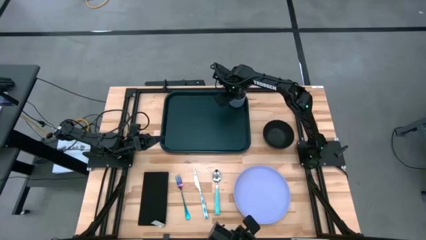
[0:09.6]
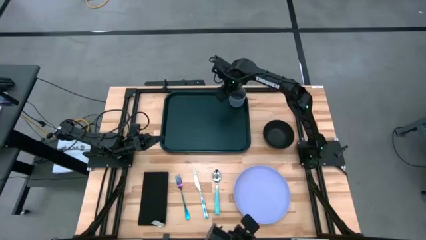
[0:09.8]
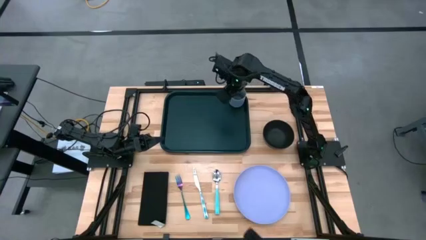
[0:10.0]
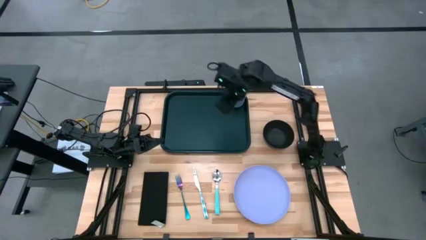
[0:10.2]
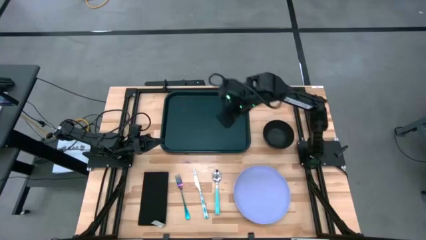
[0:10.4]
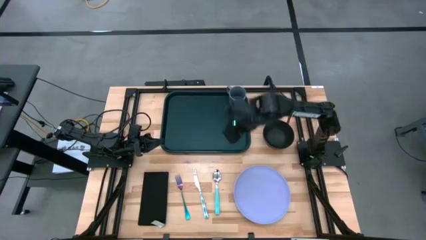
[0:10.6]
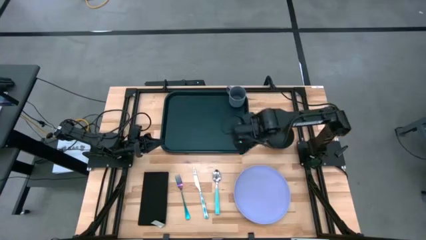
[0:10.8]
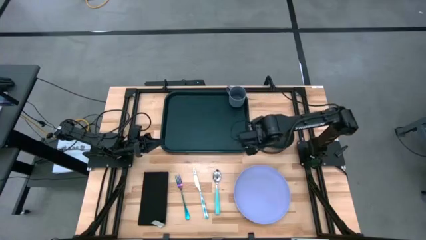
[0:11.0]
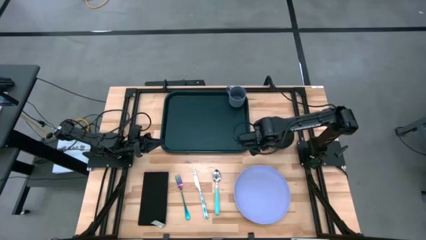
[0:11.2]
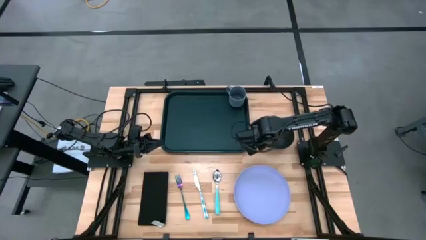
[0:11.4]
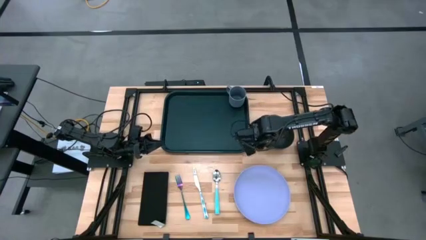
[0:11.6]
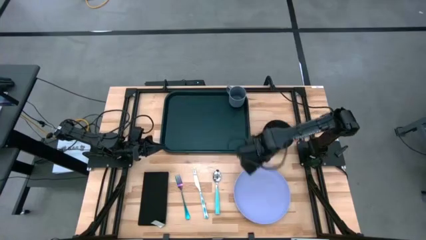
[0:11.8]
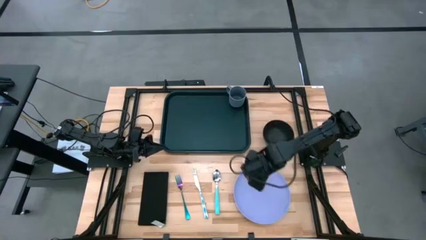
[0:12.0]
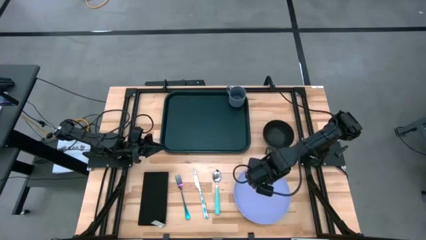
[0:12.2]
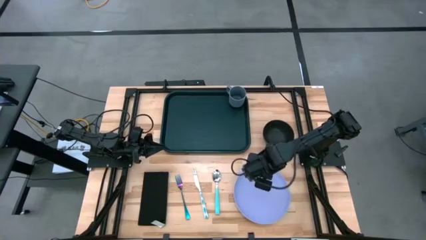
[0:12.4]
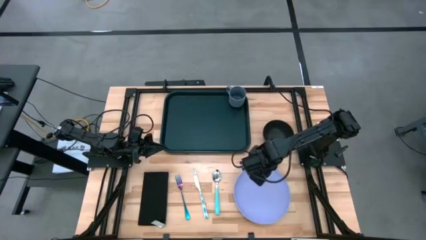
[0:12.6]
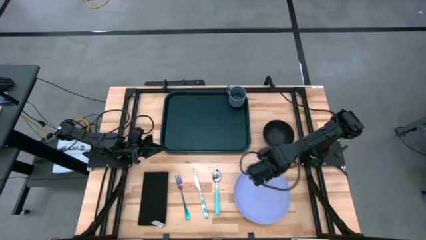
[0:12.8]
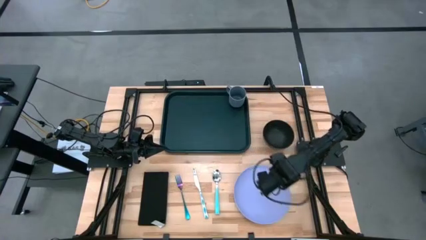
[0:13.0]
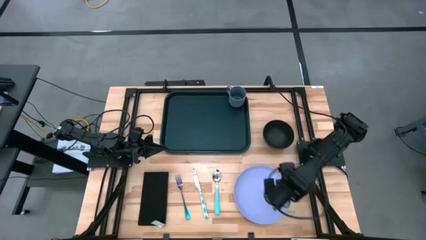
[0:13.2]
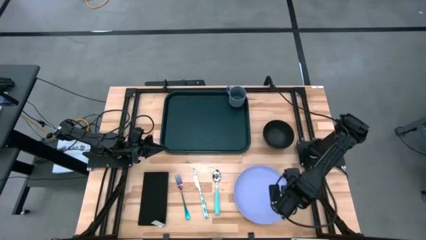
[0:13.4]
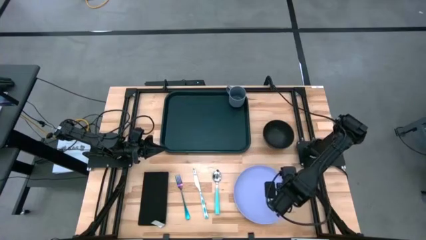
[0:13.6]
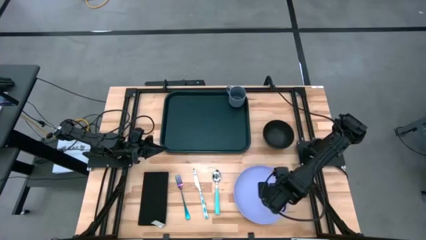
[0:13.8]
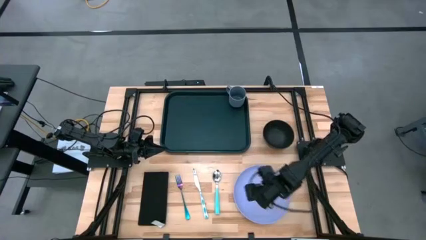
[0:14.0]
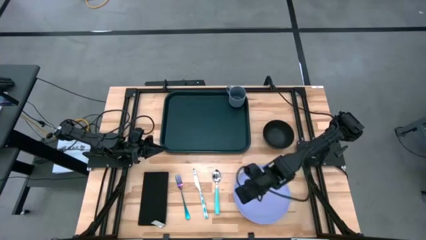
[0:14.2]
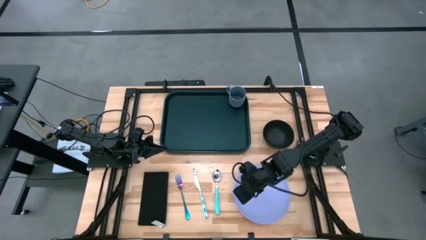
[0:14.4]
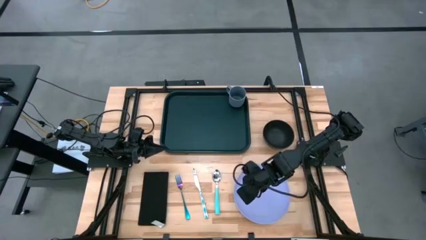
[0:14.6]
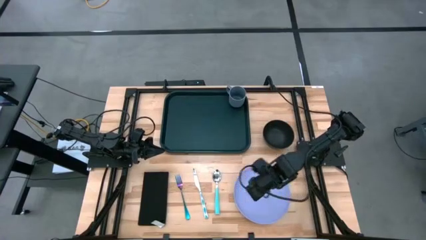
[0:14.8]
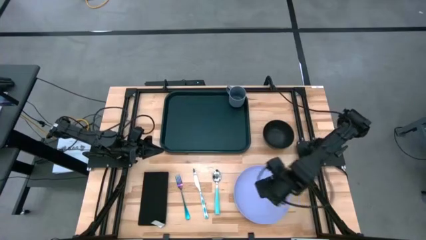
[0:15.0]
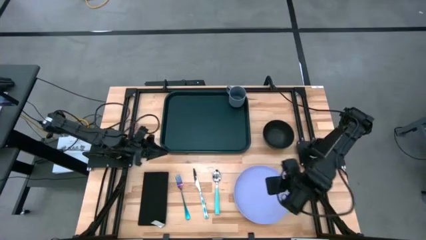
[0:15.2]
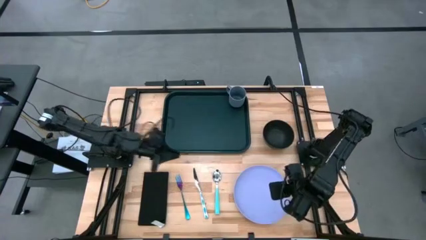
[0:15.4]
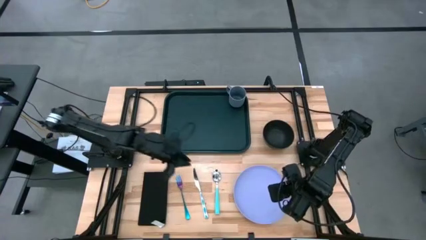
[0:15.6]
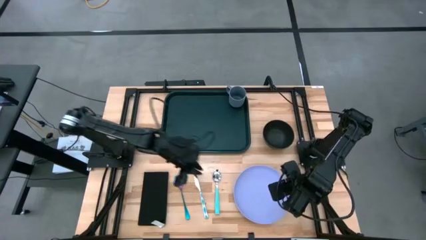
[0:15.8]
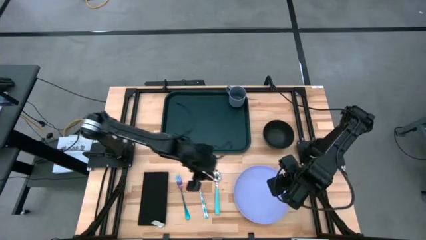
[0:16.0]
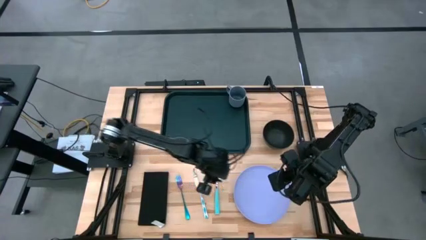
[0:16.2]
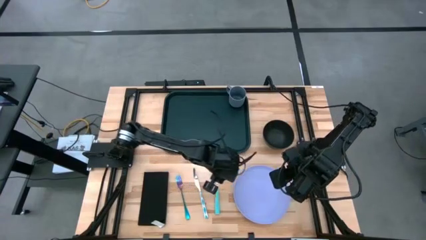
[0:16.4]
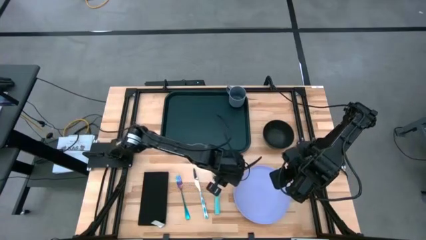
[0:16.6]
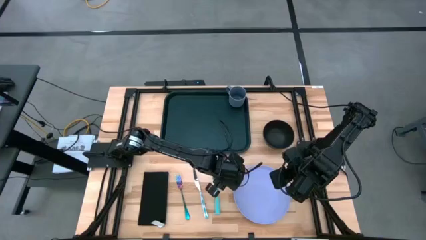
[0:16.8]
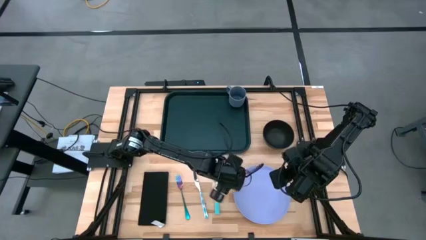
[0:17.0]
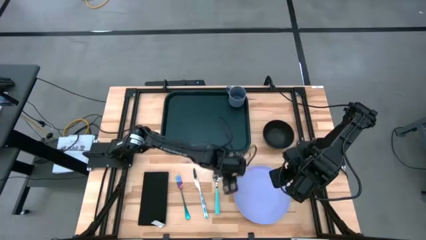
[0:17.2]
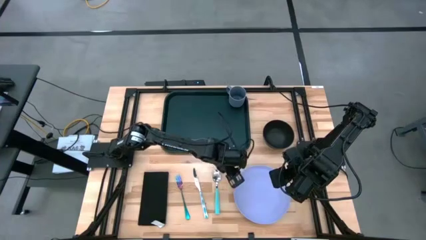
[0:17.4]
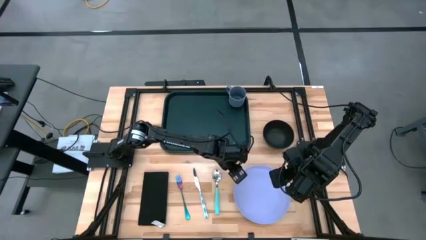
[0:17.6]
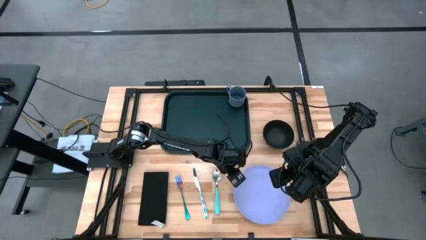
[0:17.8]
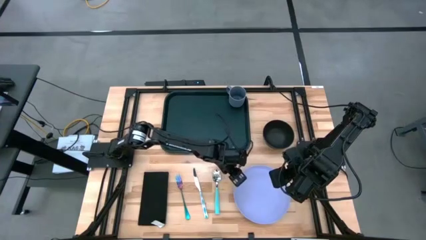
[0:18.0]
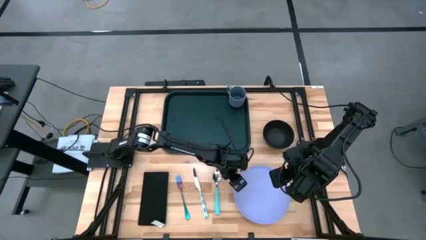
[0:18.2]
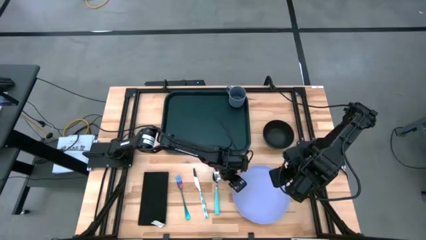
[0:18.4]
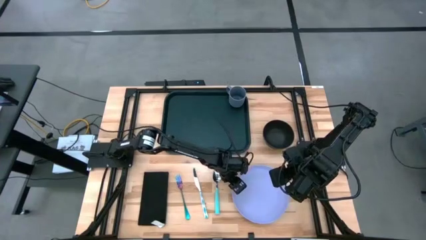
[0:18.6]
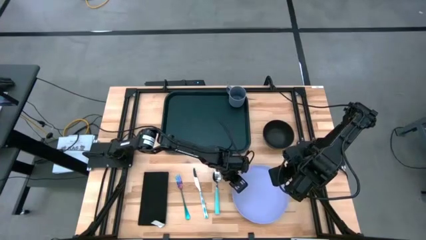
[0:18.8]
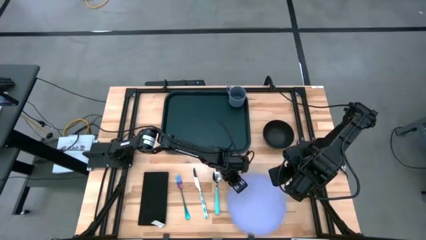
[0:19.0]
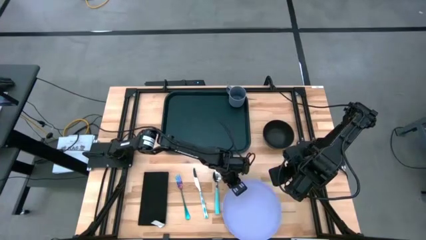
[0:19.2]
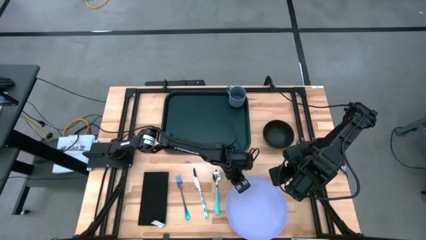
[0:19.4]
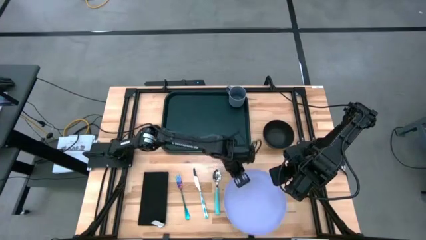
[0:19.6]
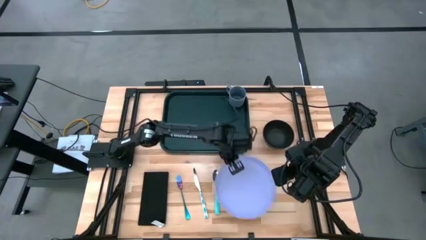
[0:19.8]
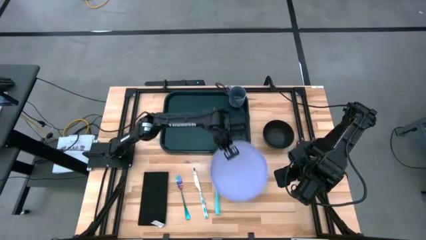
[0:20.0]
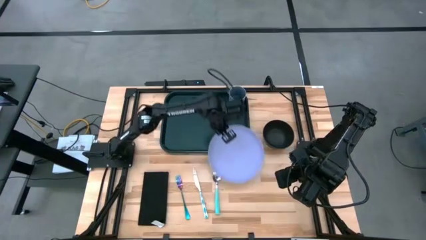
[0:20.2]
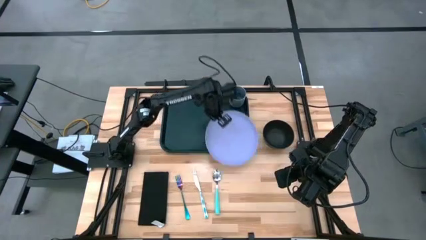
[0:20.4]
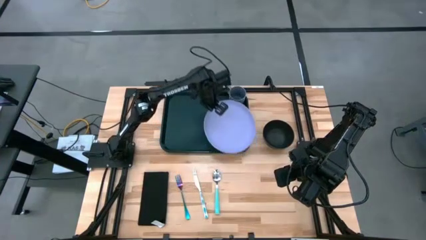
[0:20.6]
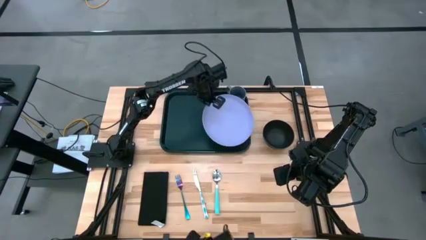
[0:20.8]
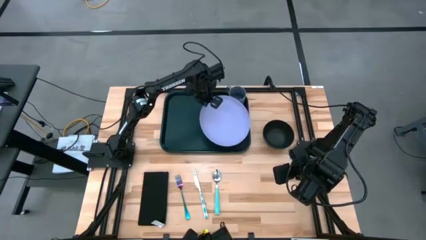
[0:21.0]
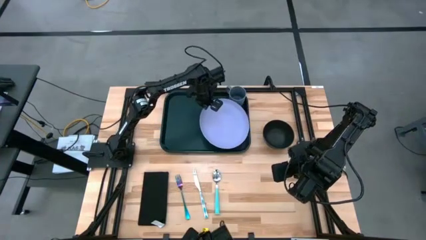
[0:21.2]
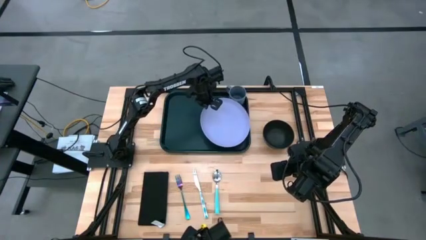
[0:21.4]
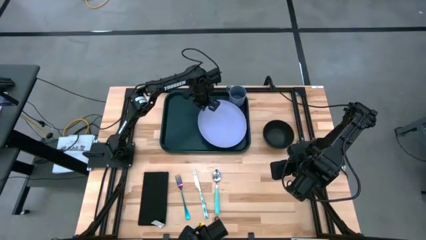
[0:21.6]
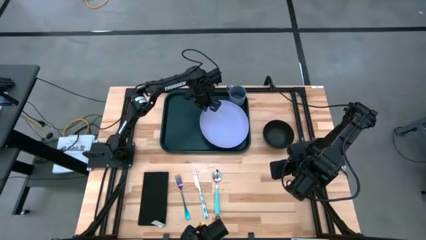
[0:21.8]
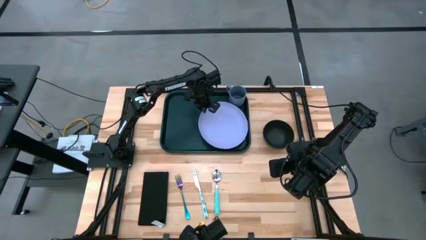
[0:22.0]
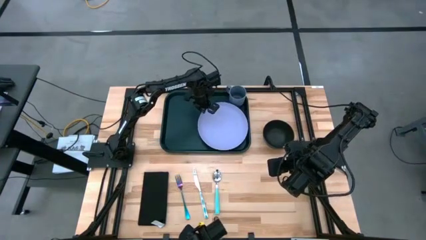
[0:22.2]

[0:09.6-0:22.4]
Task: Set up tray
Put the purple plate to the right on the black tray

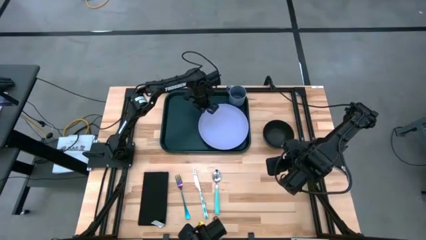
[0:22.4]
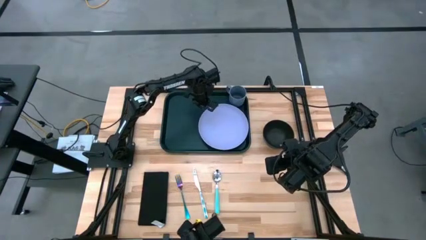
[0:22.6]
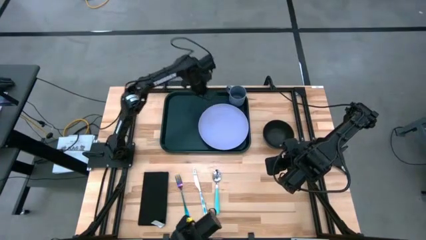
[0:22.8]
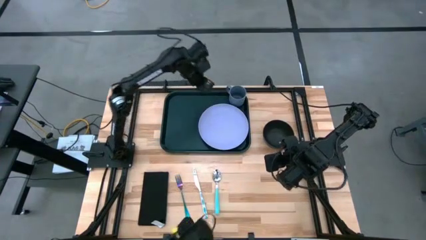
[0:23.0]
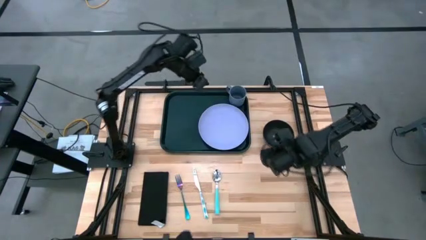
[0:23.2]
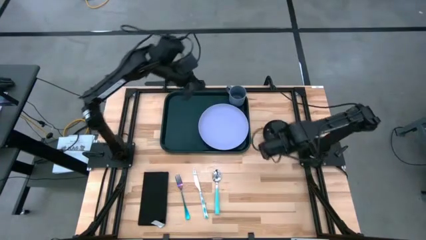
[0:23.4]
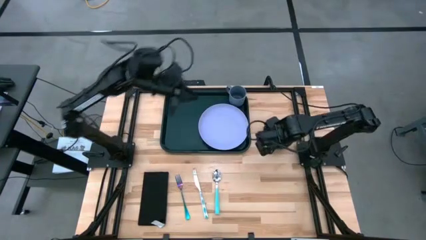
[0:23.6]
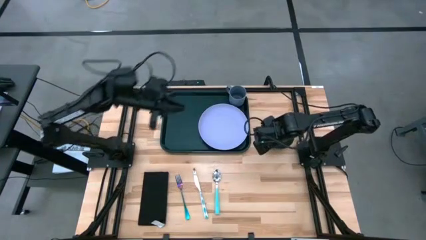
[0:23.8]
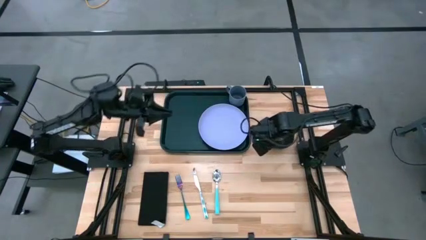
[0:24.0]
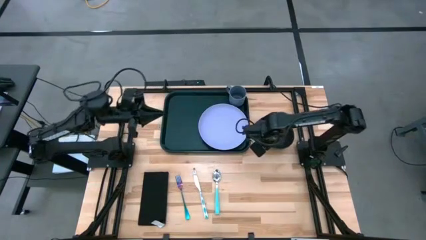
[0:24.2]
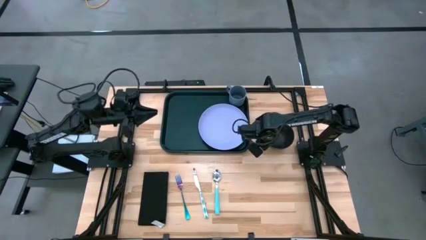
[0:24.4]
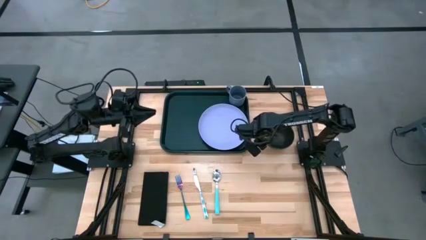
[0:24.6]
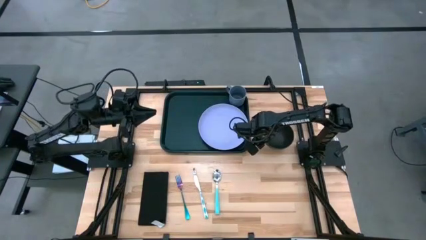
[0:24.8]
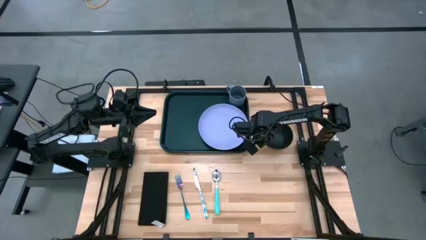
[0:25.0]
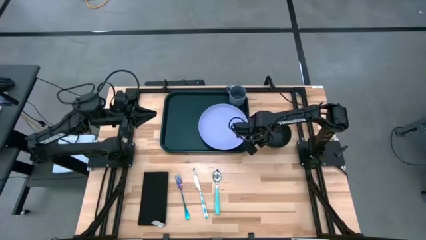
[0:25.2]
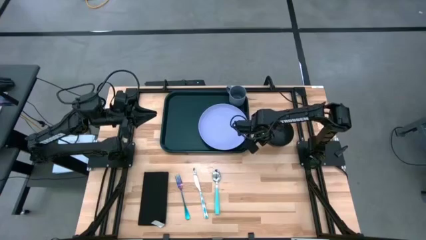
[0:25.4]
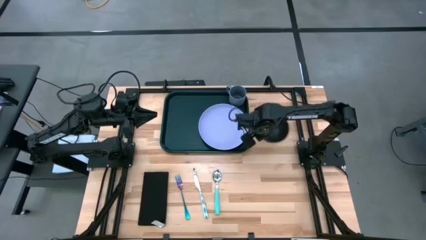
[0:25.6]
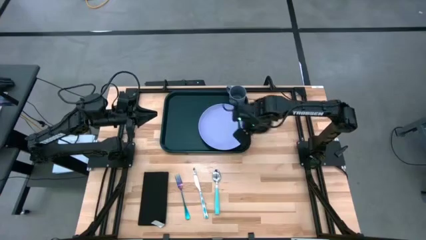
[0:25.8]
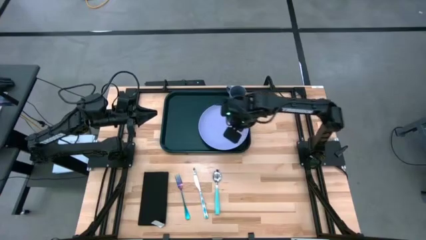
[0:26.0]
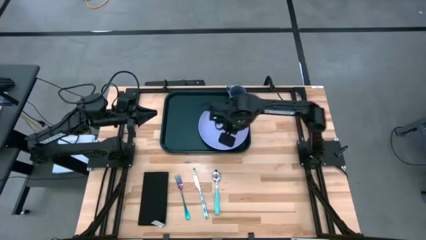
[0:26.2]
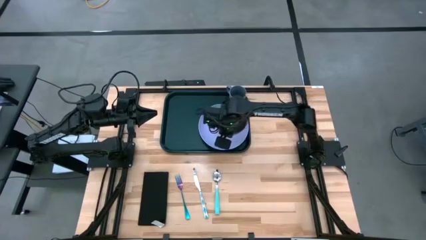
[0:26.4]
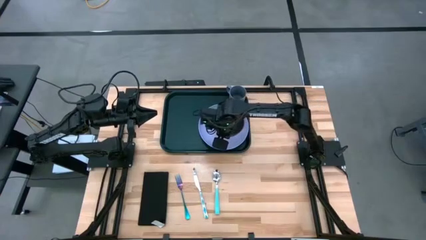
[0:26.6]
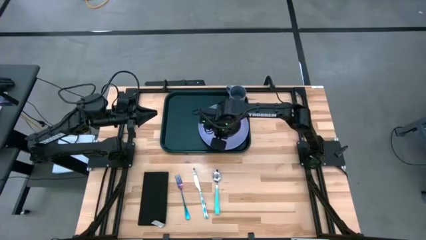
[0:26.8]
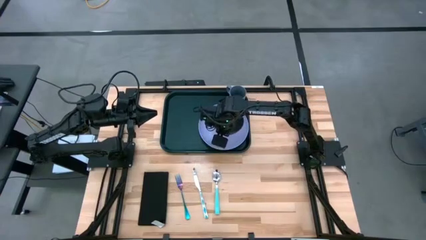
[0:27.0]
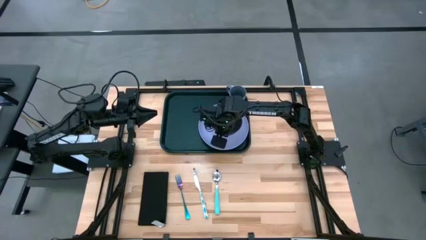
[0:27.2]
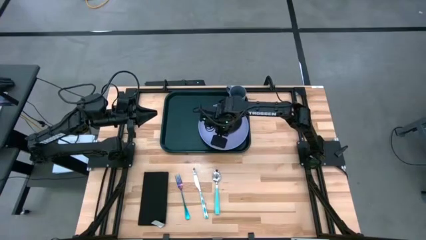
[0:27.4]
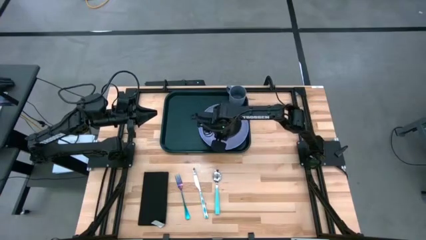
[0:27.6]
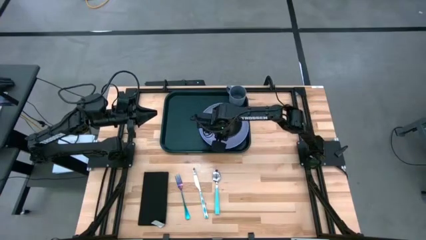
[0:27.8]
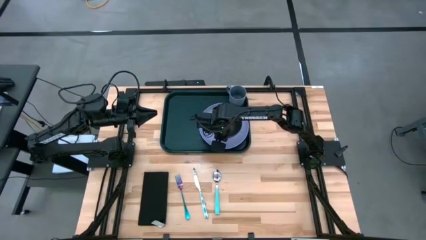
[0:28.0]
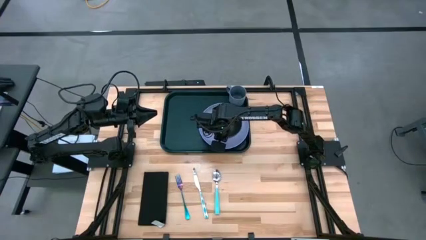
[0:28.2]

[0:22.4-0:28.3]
Put the black bowl on the purple plate
